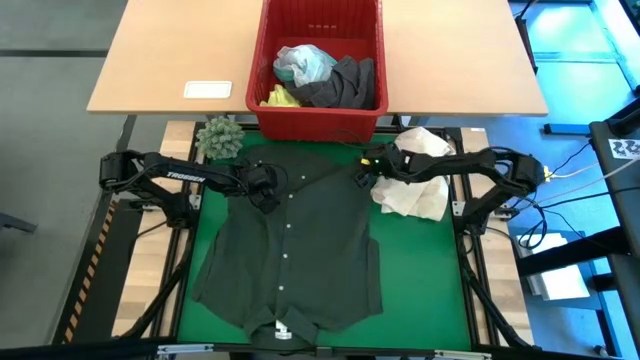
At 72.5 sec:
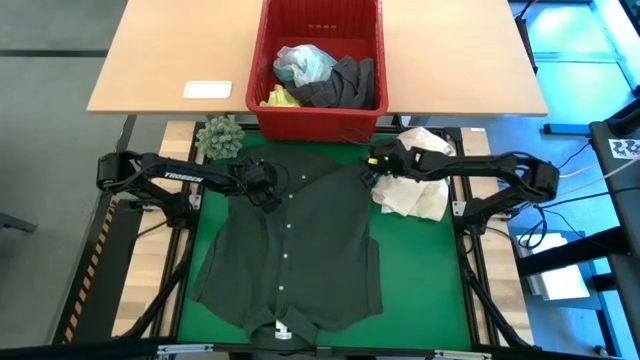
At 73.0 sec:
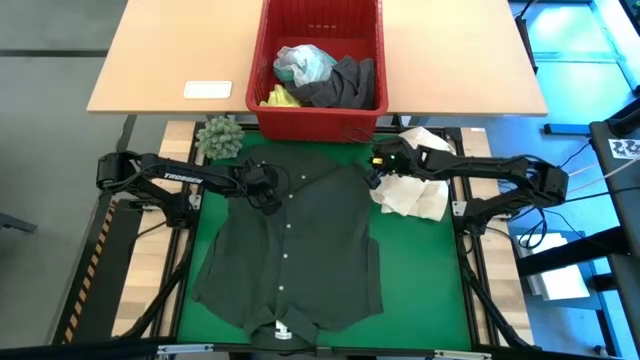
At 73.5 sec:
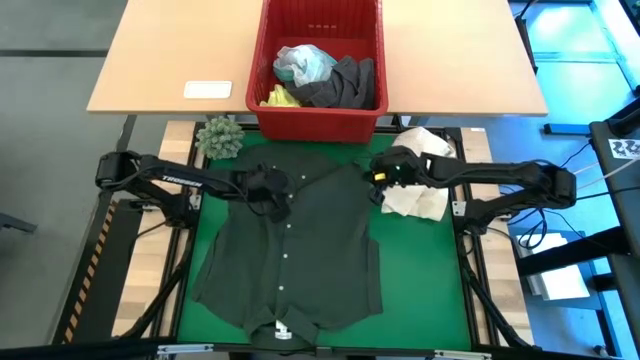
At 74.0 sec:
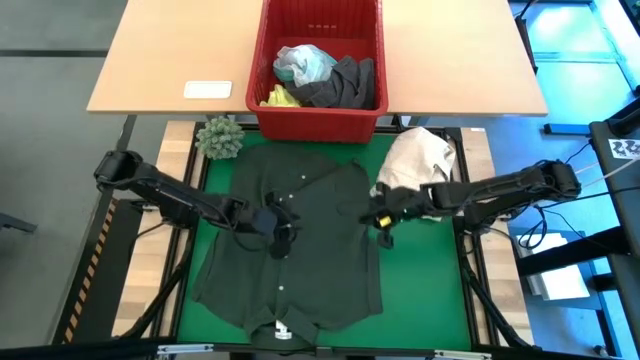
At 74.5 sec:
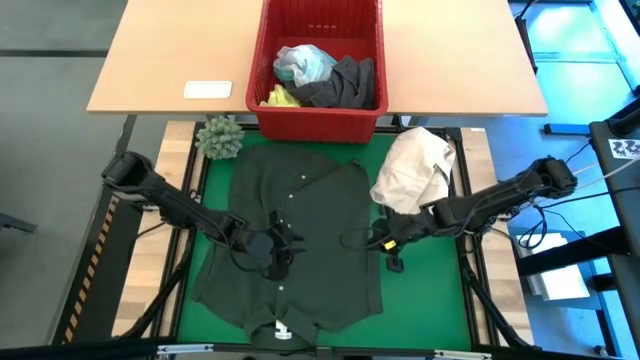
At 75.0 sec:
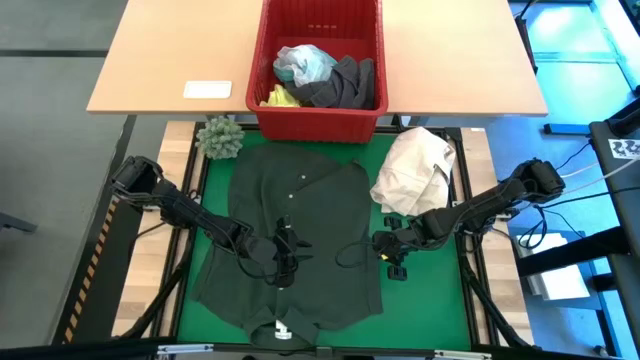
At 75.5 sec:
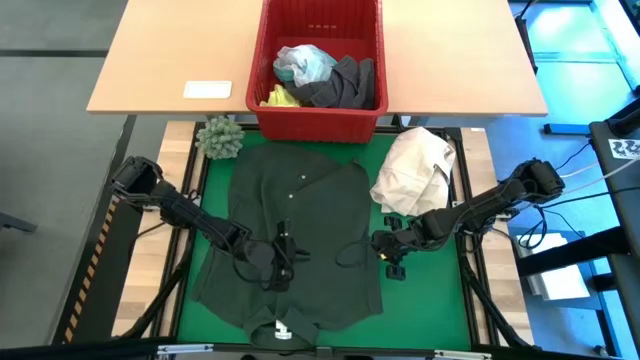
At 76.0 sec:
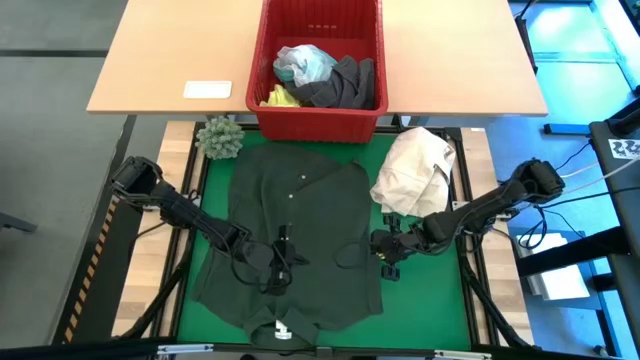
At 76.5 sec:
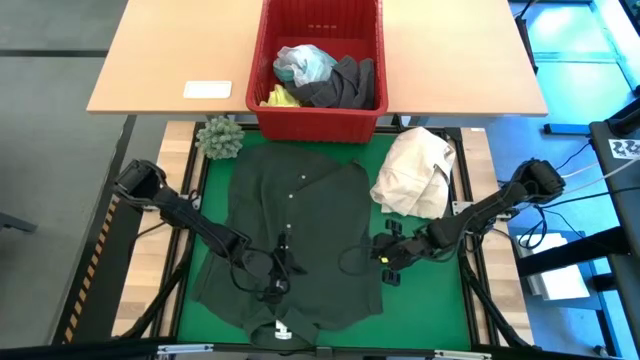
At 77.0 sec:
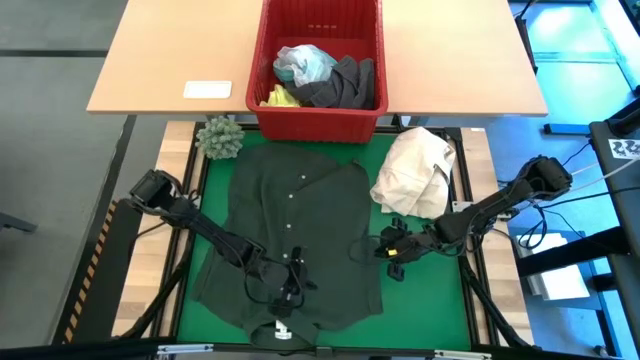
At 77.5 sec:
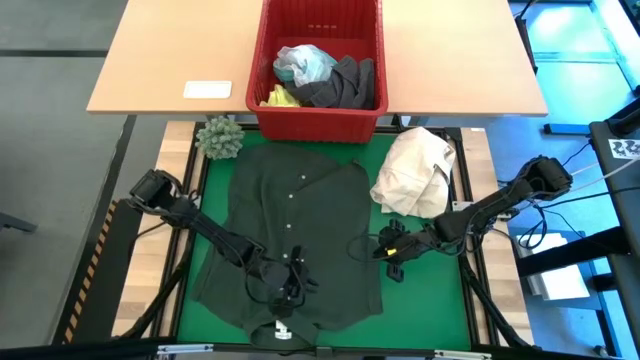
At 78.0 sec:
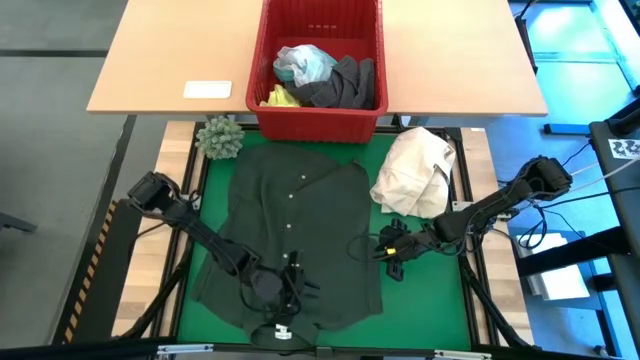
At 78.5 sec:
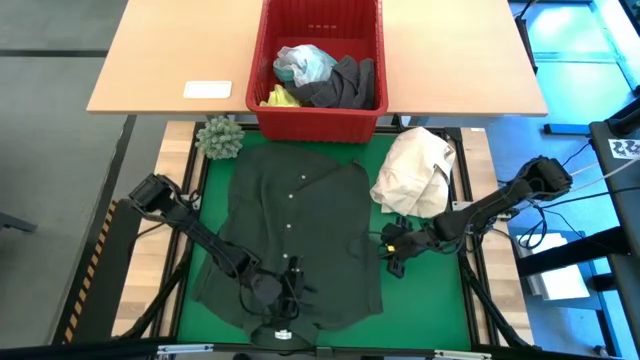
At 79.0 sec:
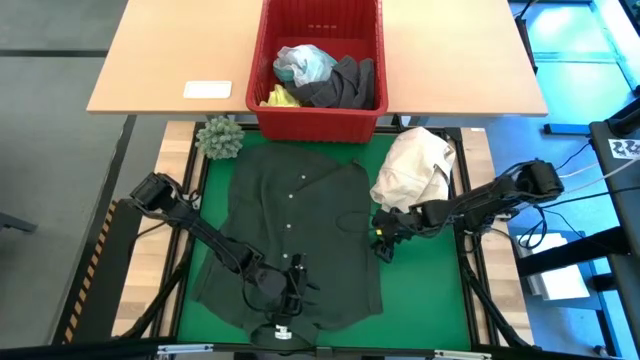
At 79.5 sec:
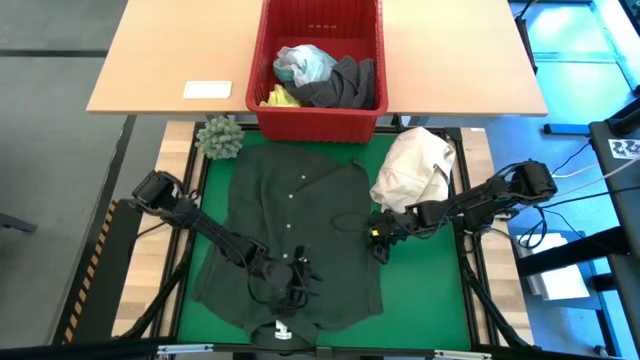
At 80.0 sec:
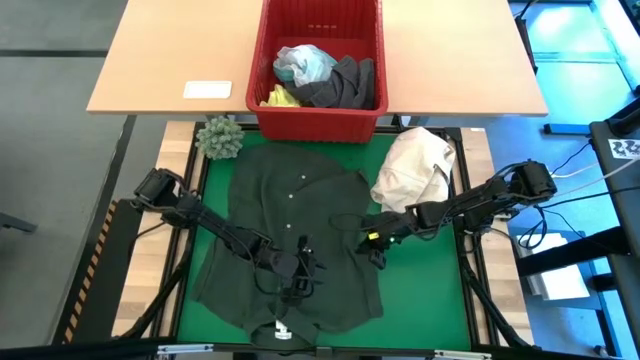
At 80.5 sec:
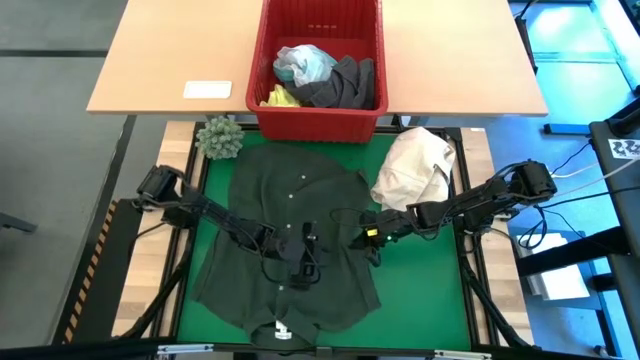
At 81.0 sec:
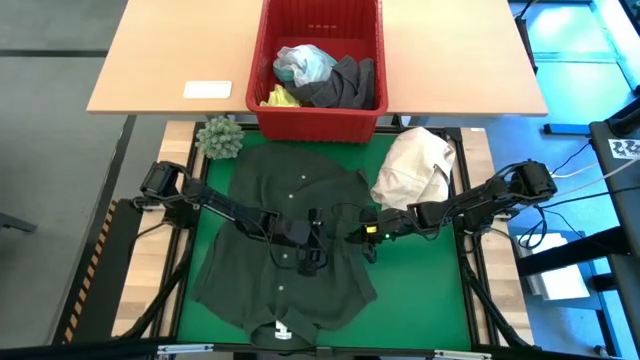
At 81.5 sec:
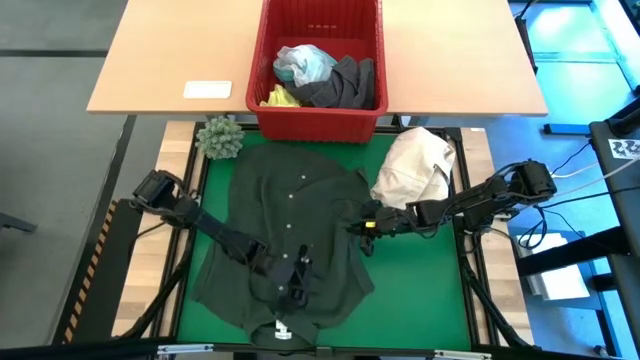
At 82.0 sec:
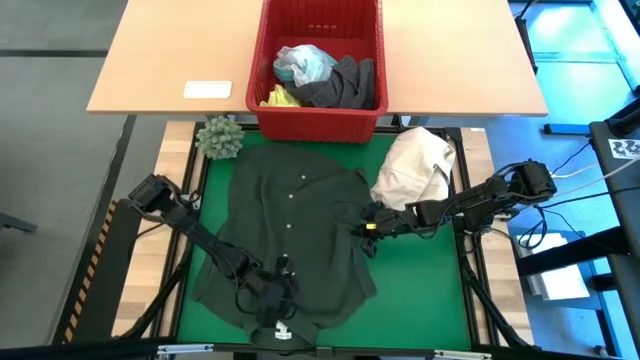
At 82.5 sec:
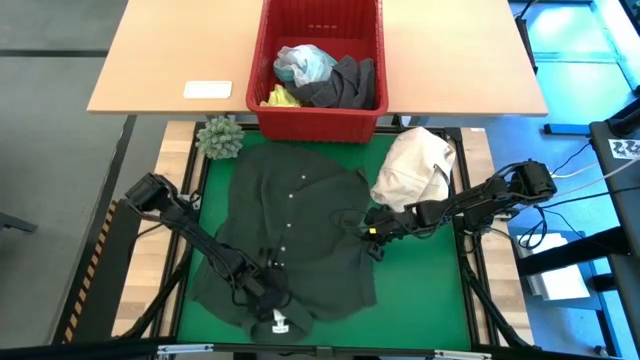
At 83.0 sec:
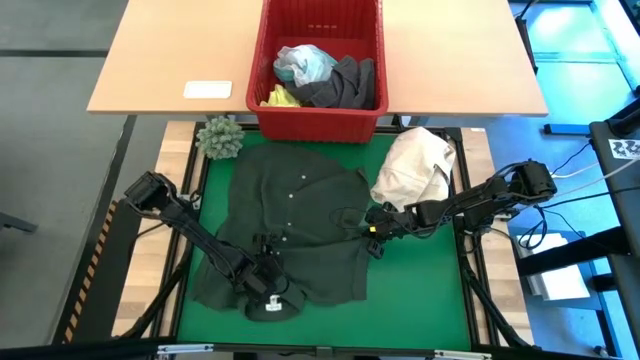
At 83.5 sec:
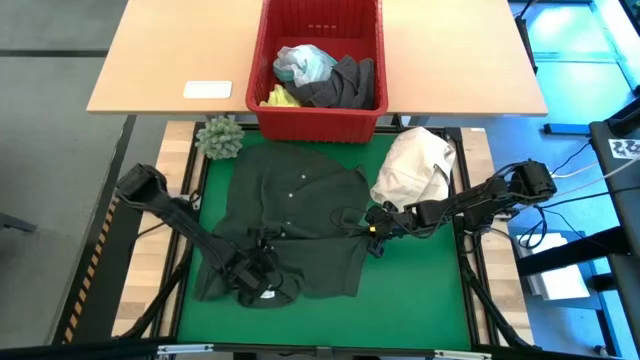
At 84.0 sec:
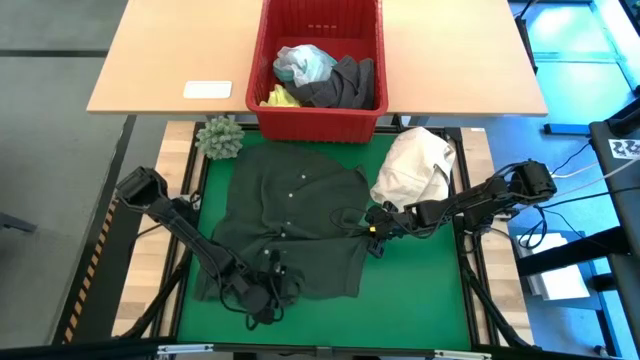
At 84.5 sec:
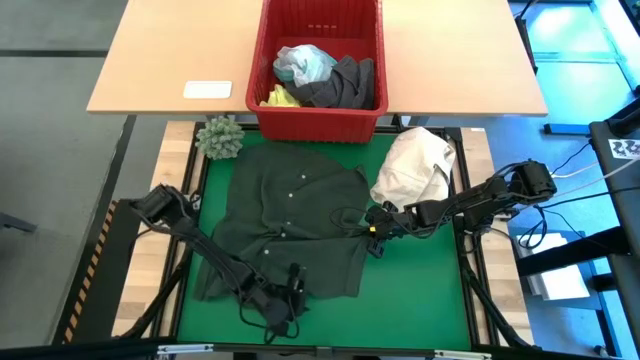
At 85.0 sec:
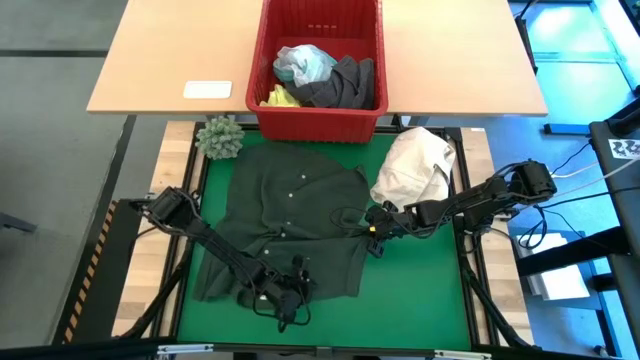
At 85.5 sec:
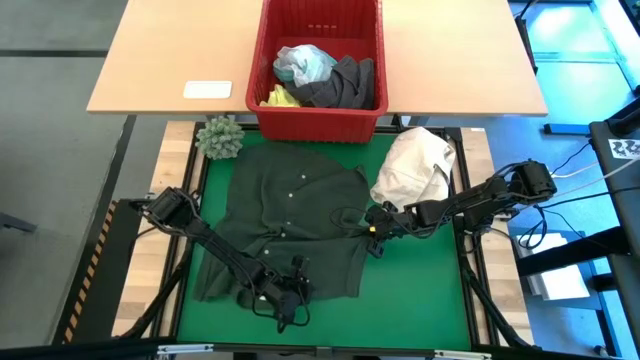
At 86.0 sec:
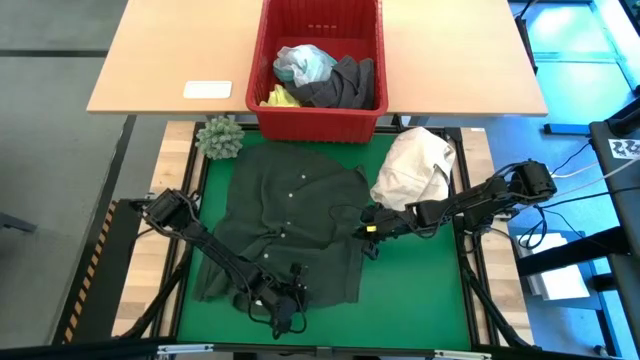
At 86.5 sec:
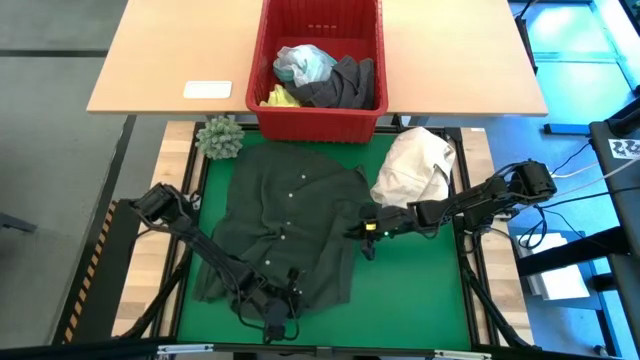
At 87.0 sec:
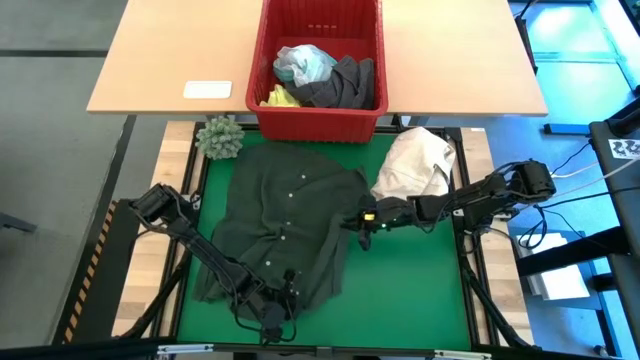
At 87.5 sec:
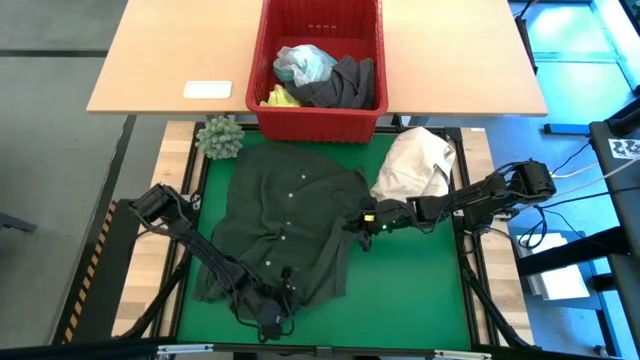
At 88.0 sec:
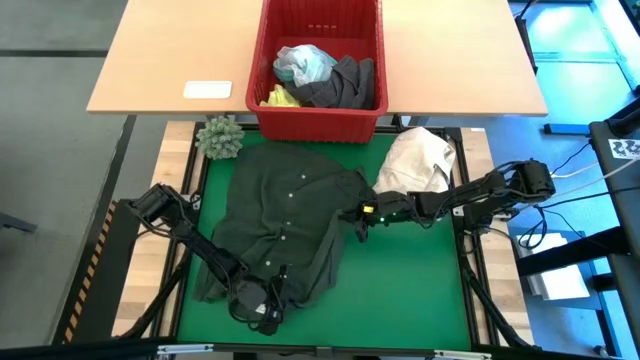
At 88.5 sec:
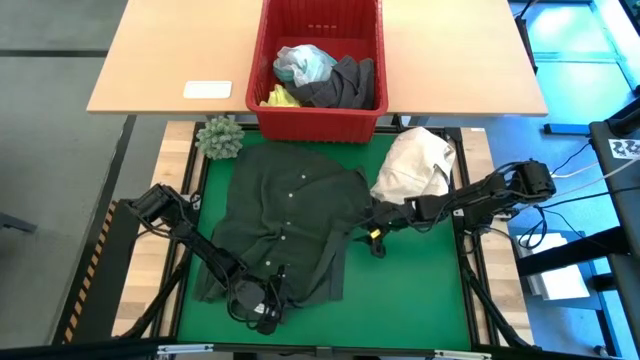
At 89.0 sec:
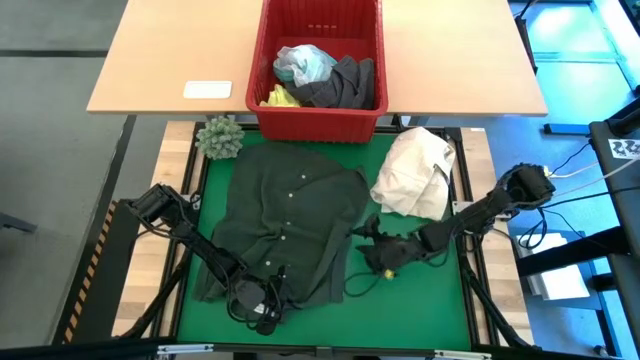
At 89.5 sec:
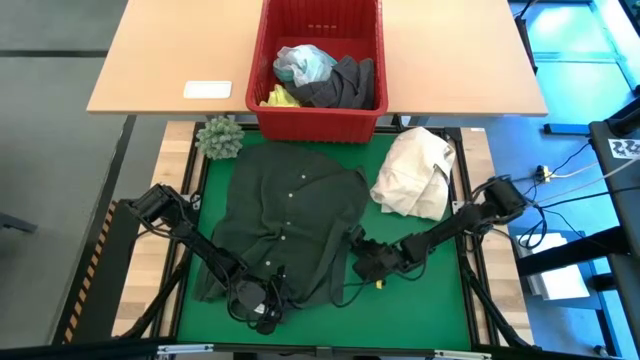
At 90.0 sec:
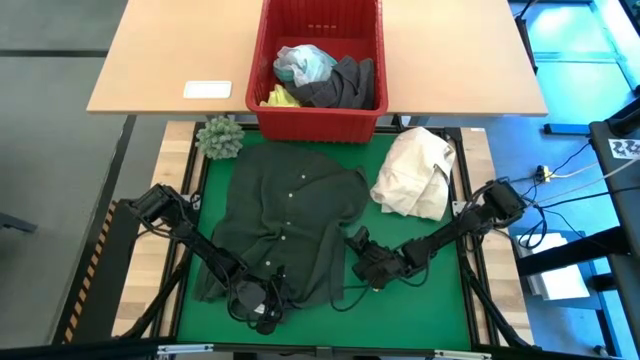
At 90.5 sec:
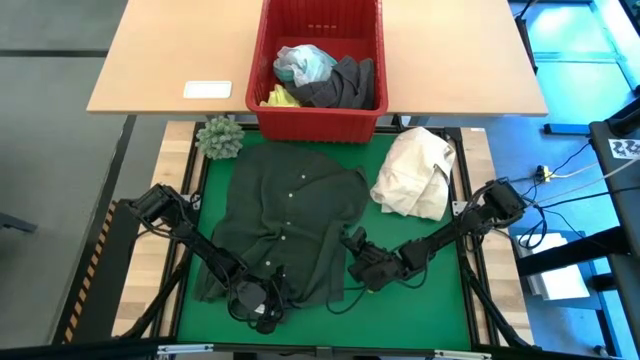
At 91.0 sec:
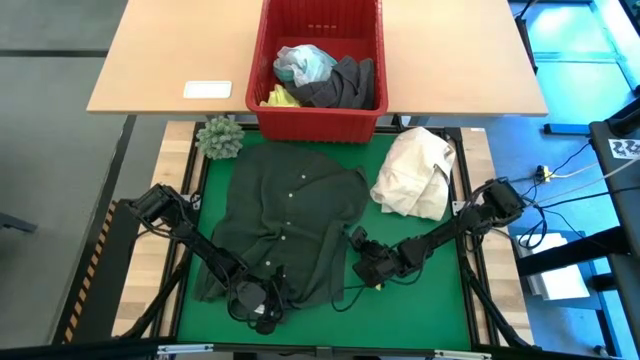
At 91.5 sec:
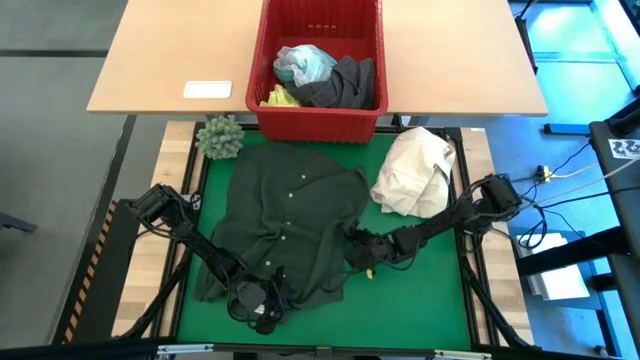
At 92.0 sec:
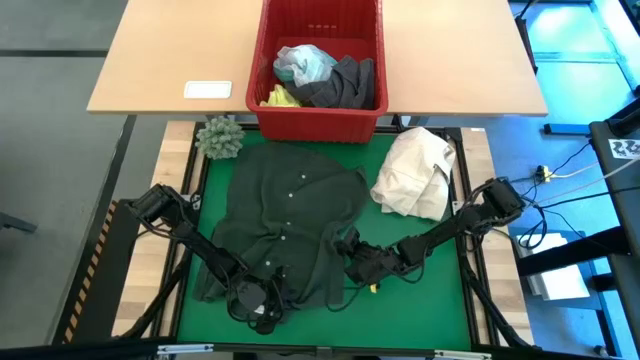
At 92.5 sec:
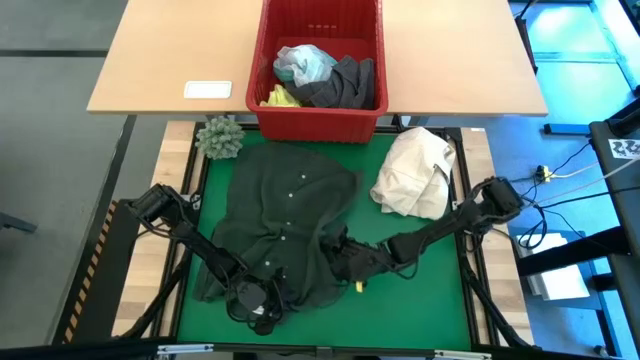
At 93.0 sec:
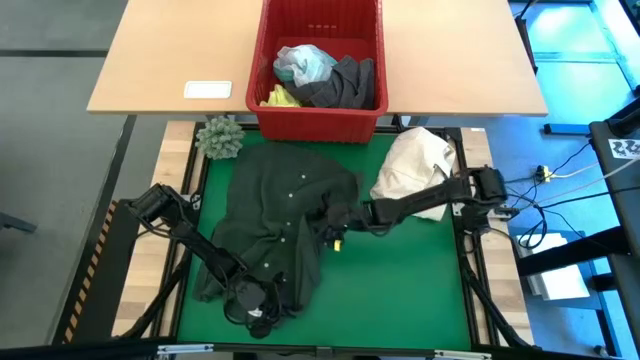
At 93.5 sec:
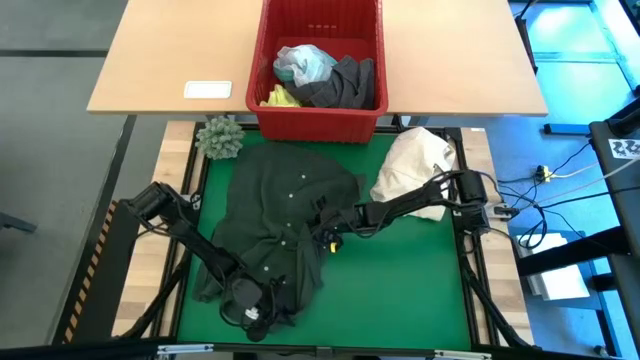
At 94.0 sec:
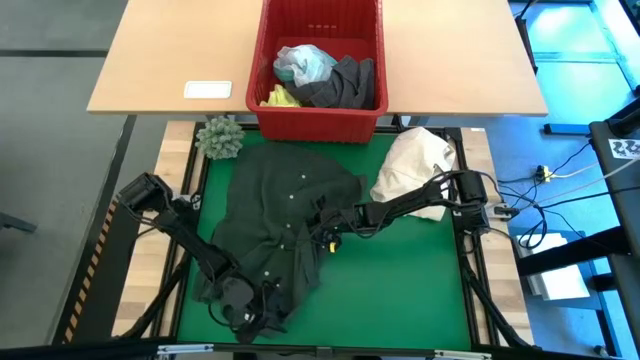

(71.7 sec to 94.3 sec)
Task: Fold Laundry from Bin
Fold the dark green polo
